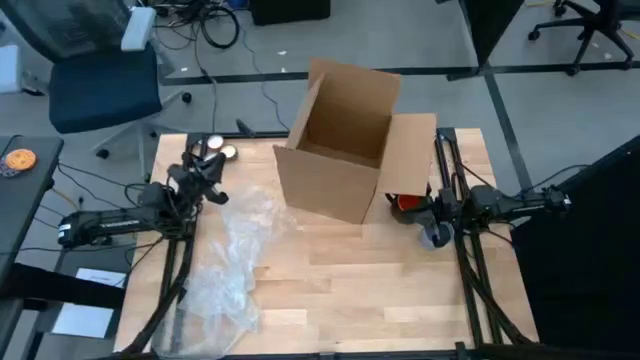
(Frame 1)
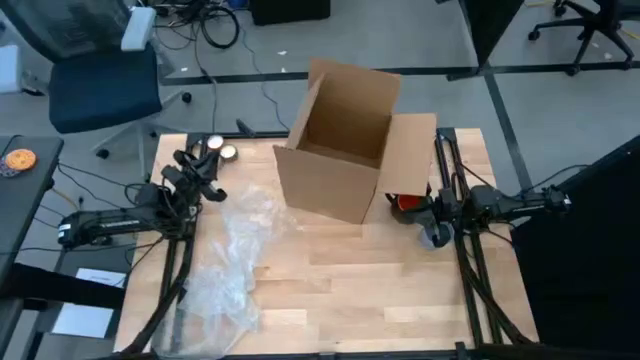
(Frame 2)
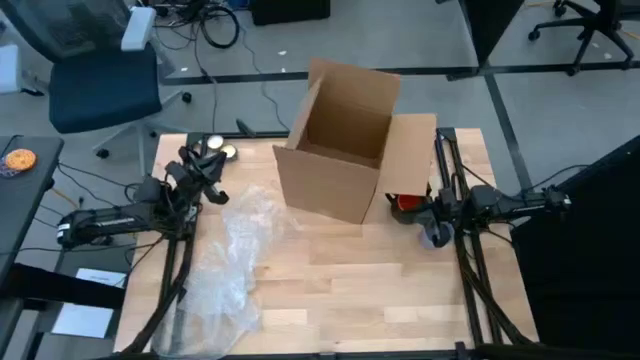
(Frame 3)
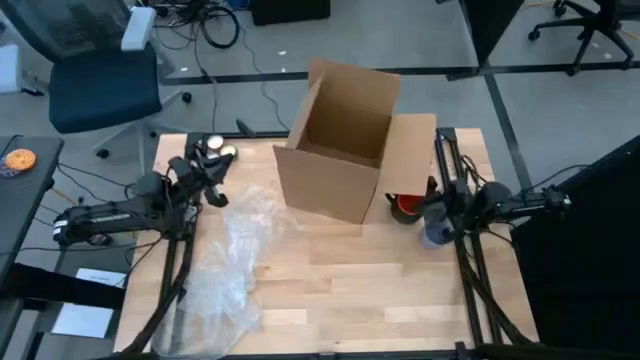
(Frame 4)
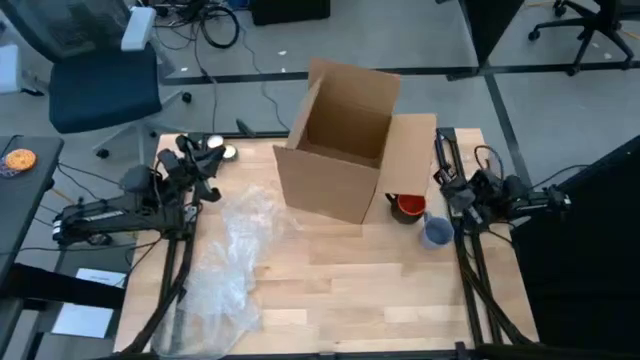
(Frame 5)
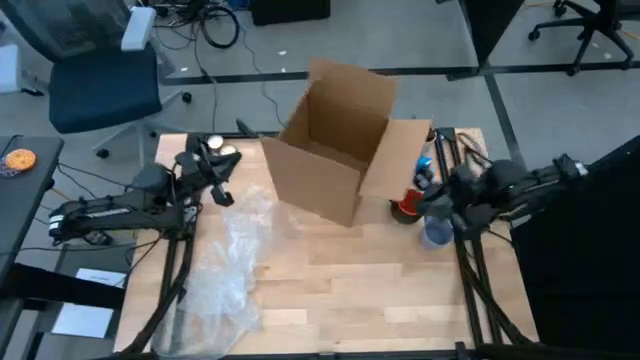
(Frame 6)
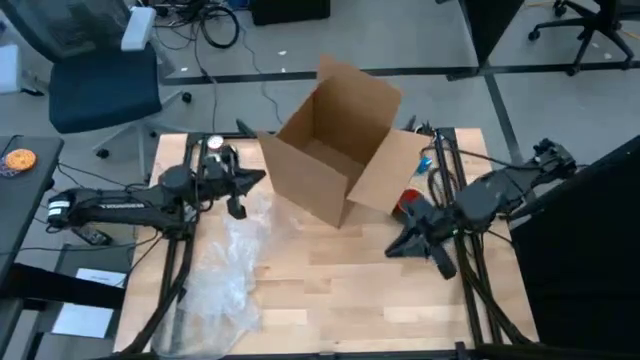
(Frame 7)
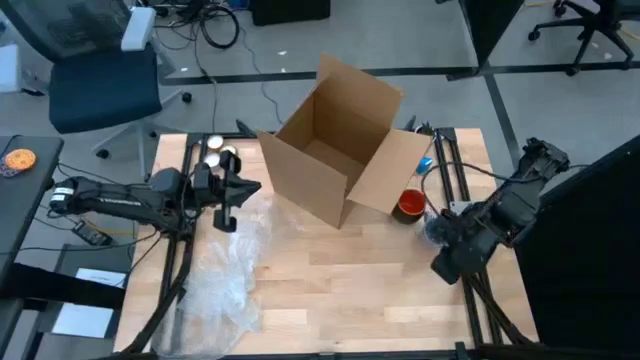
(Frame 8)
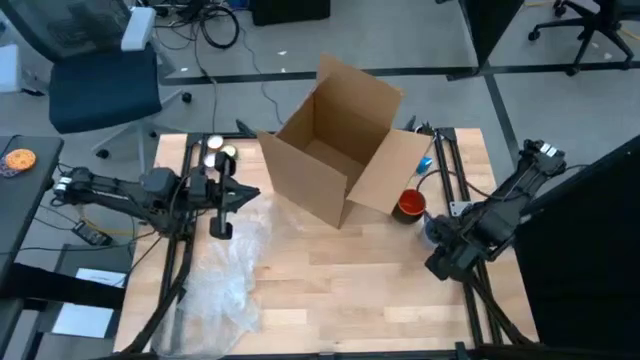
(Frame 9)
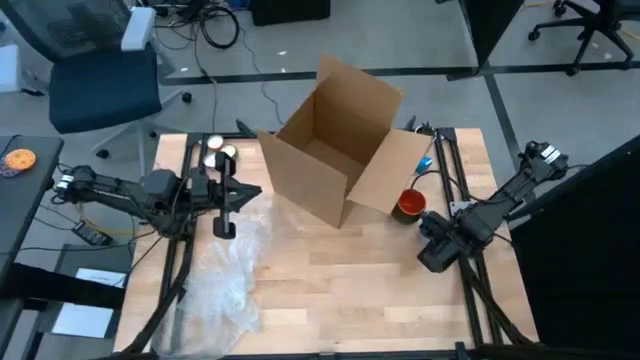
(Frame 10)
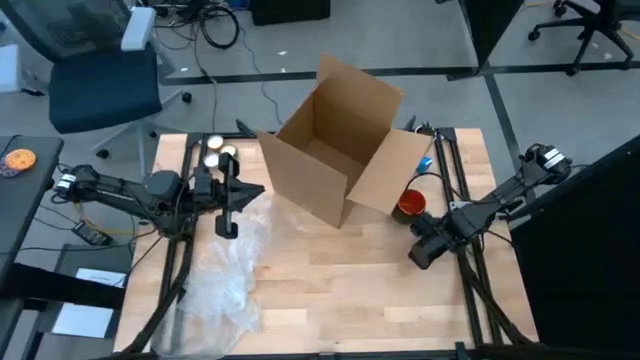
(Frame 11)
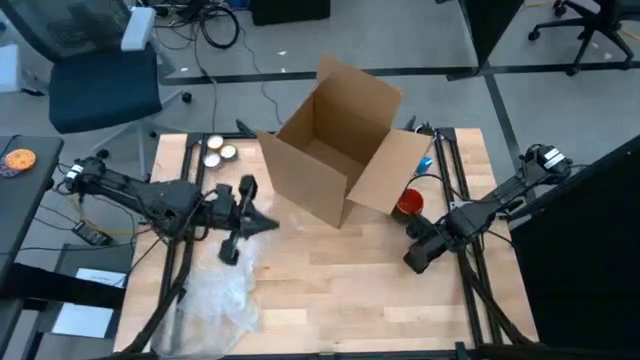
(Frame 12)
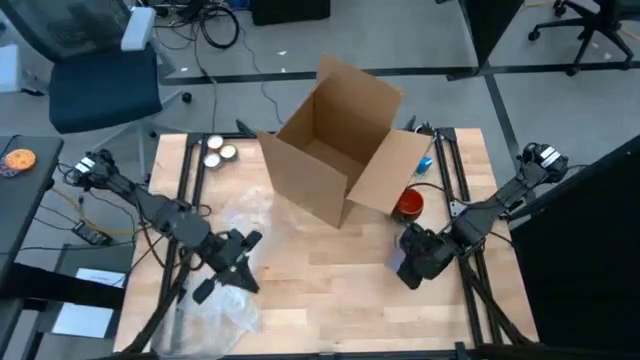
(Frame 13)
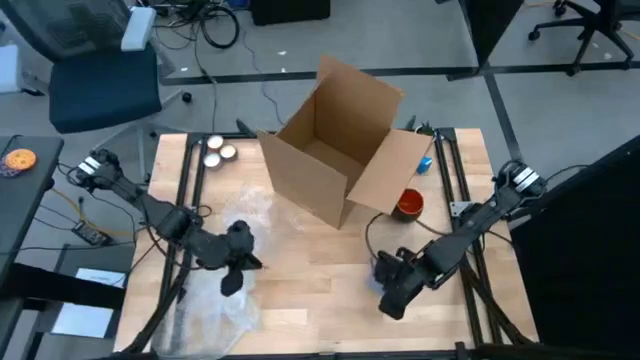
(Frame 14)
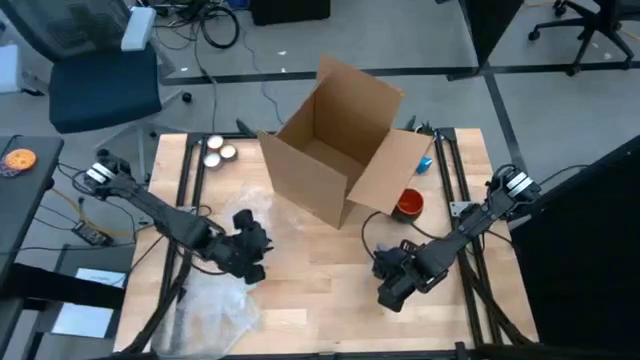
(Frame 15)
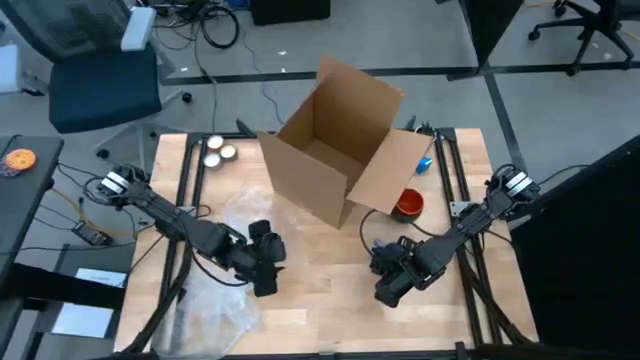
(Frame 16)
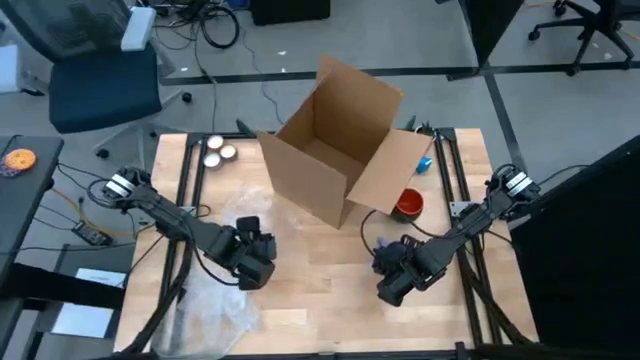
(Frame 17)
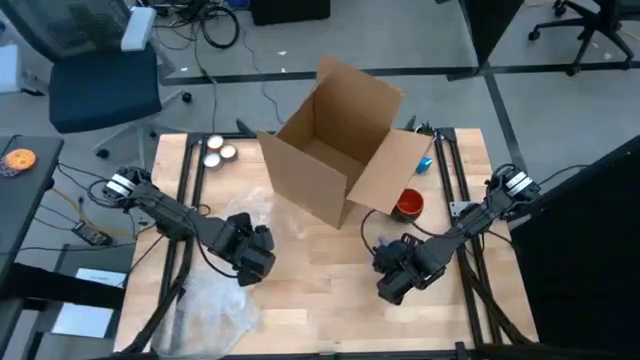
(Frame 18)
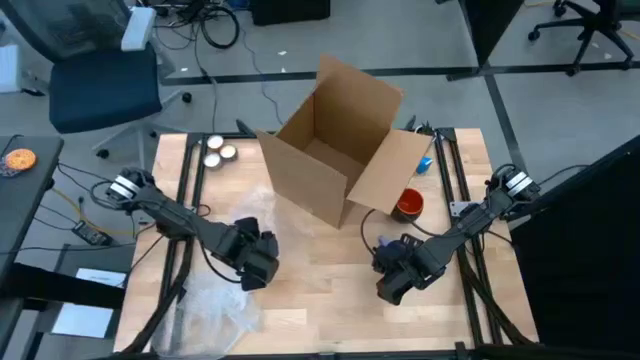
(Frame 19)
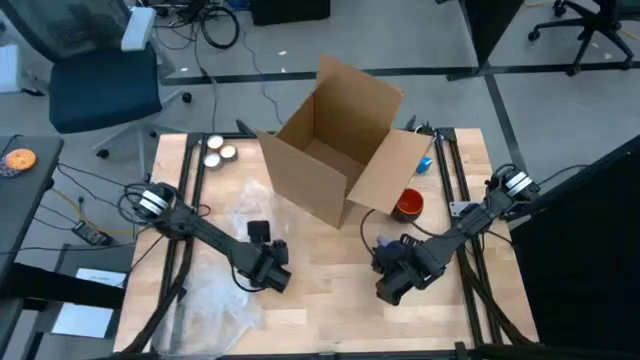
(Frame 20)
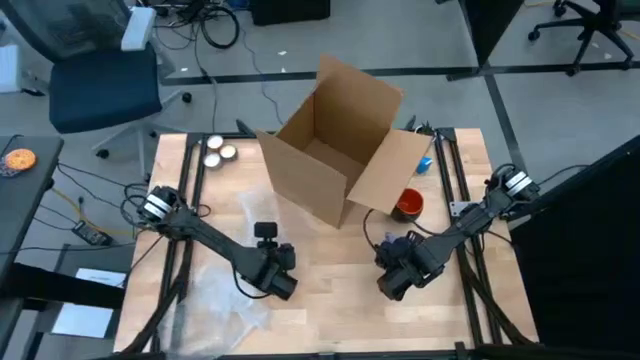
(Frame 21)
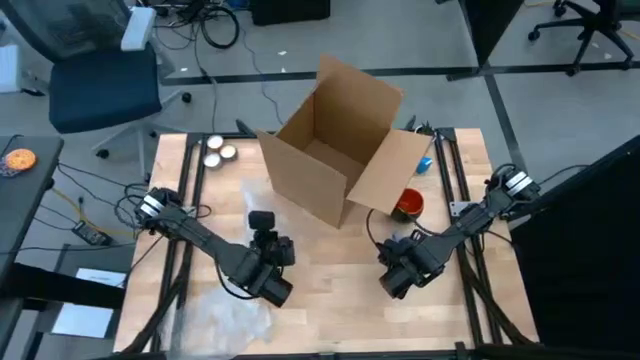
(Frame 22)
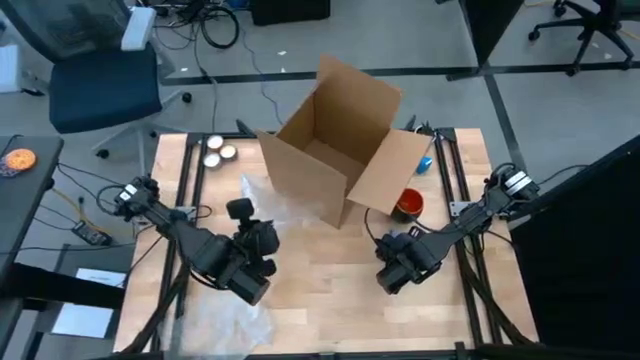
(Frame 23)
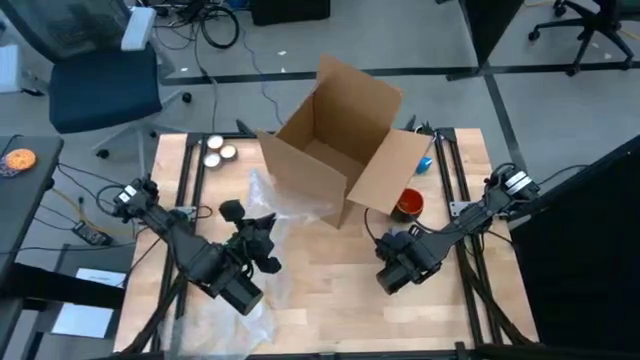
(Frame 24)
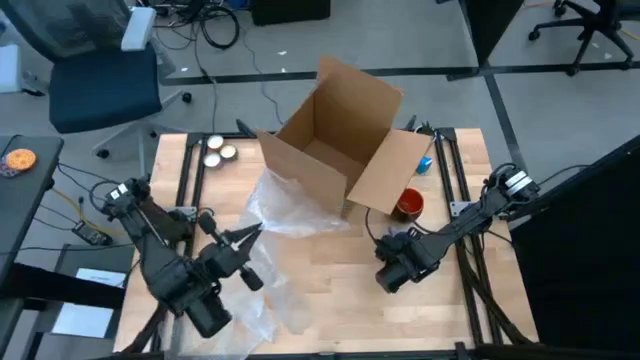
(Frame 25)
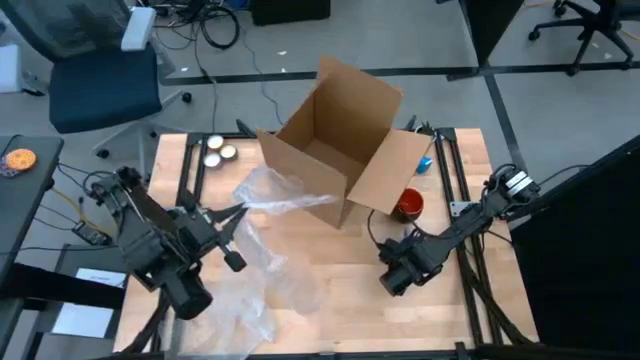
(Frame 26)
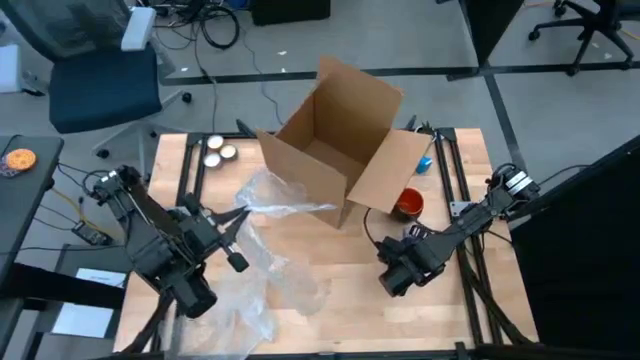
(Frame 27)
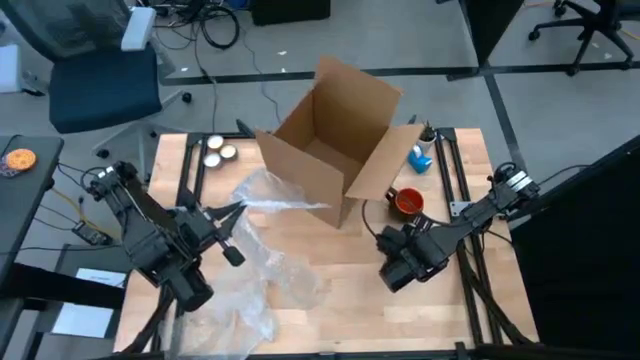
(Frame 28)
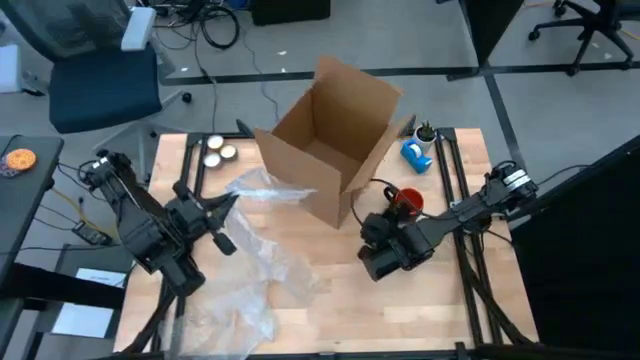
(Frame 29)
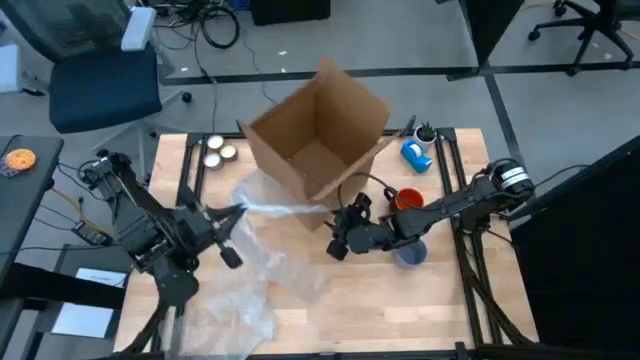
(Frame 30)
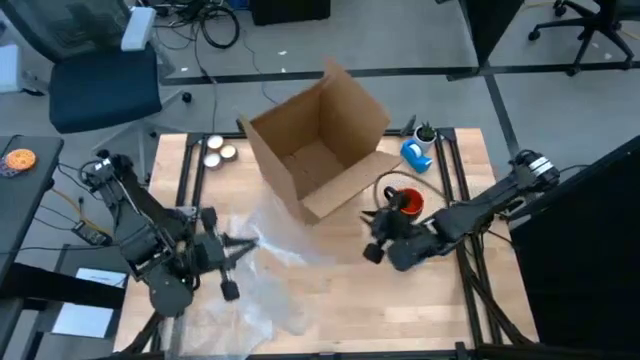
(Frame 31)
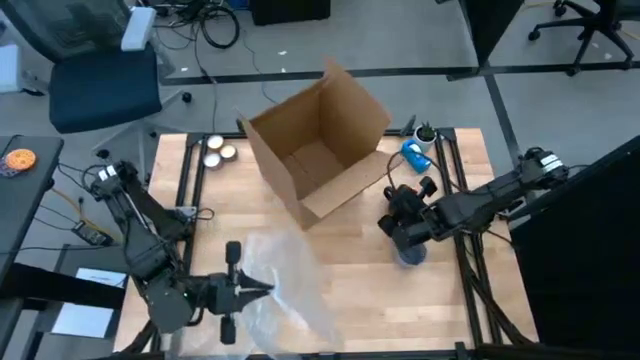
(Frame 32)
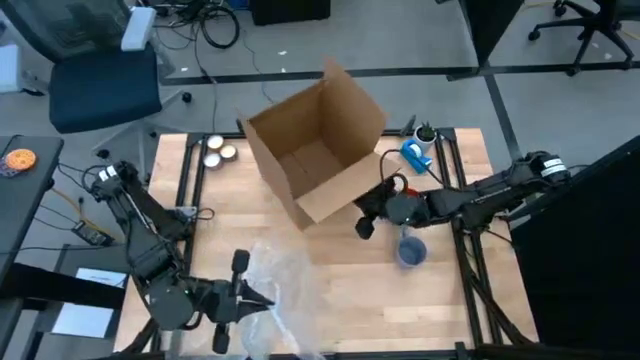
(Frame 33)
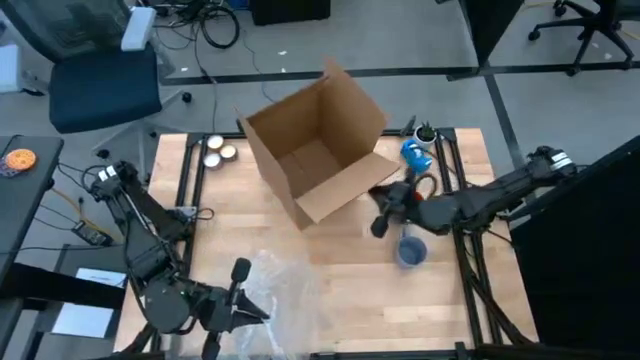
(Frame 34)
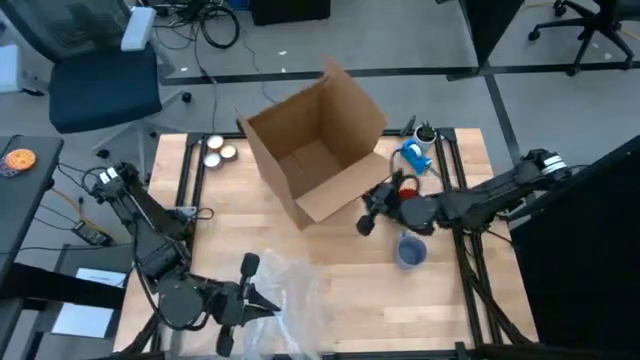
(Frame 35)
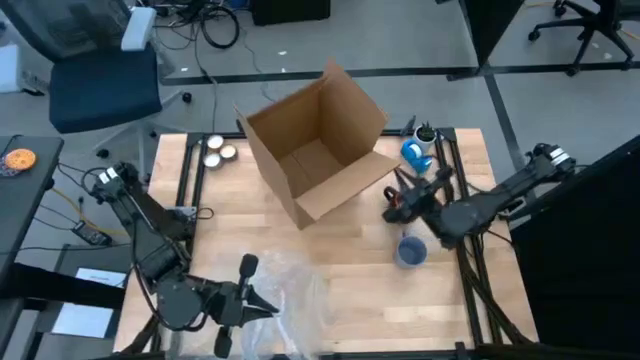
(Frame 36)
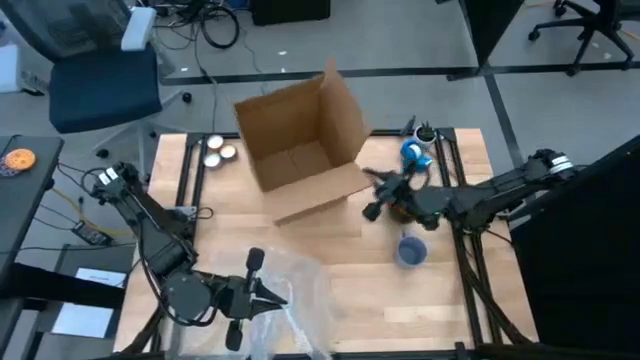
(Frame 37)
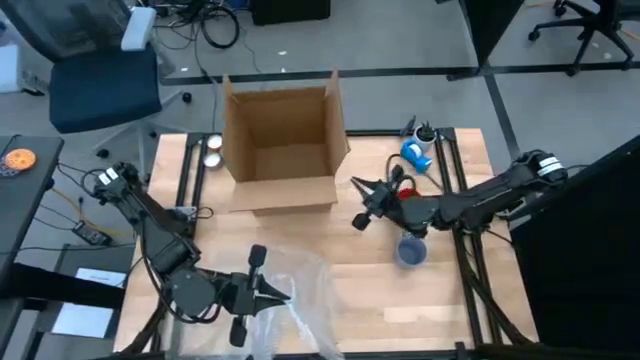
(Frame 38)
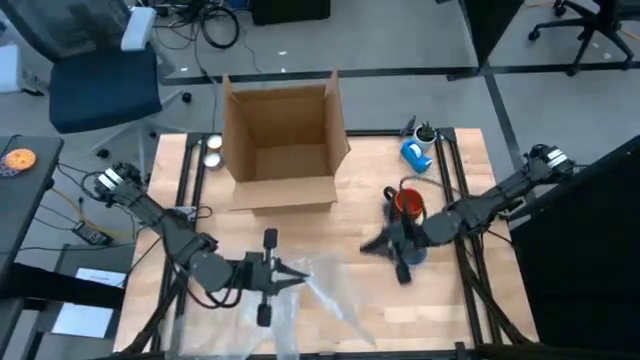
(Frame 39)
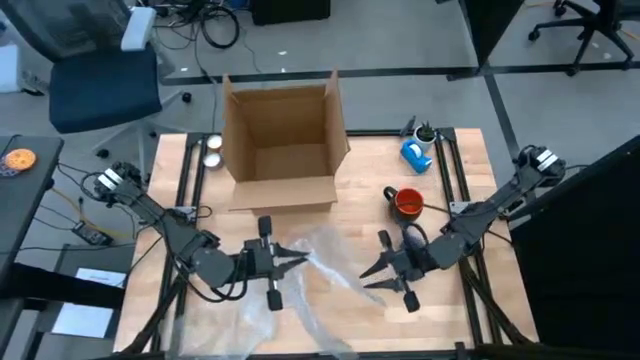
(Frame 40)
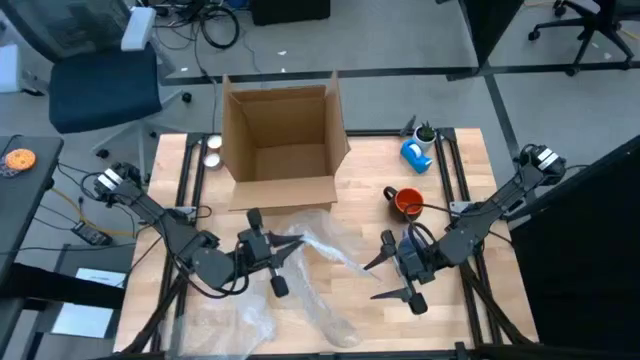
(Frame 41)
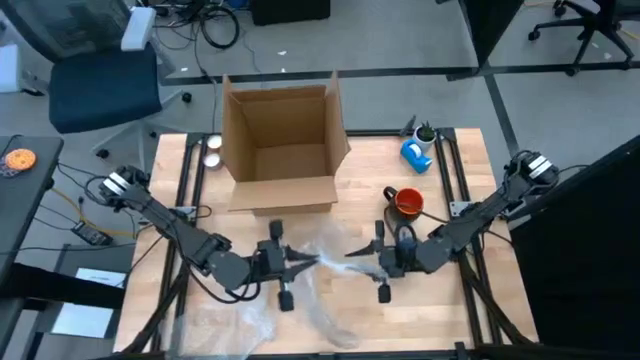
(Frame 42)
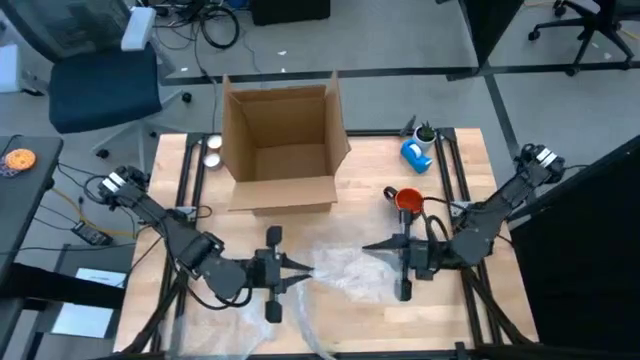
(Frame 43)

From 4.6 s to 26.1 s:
Task: wrap mug
Wrap the blue mug with the top bubble wrap
